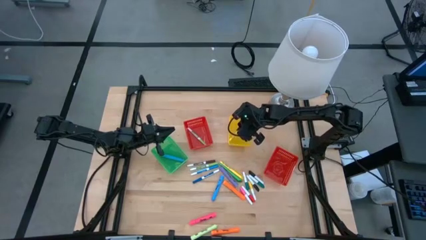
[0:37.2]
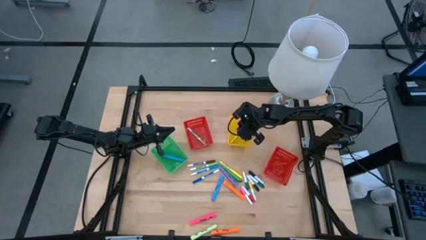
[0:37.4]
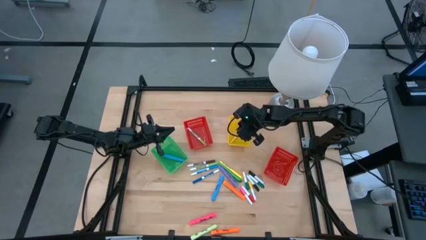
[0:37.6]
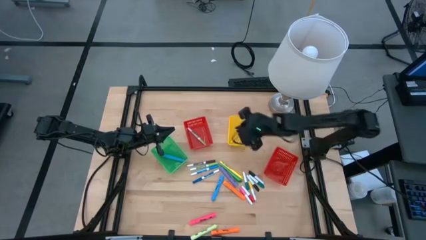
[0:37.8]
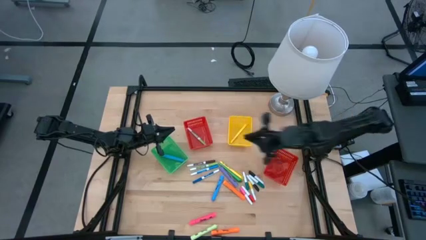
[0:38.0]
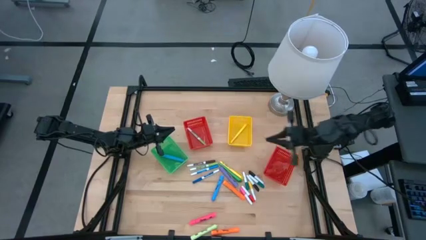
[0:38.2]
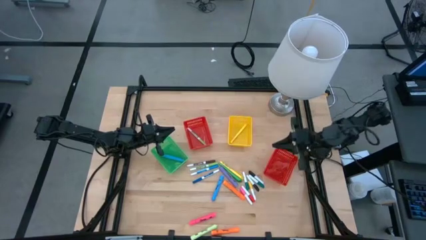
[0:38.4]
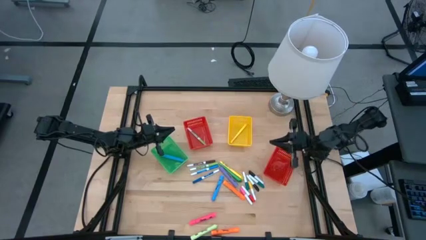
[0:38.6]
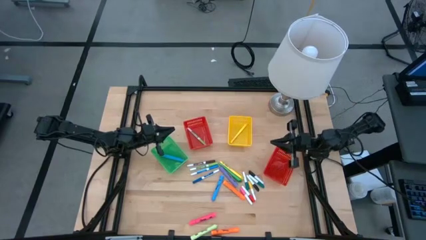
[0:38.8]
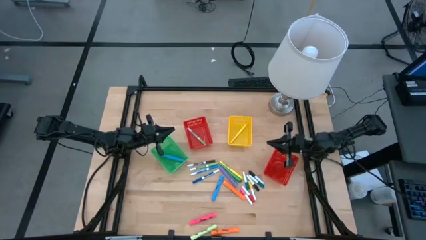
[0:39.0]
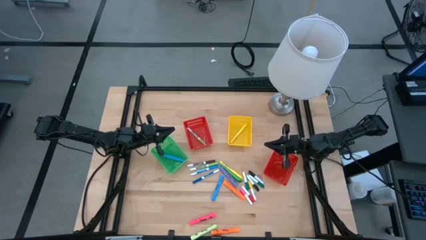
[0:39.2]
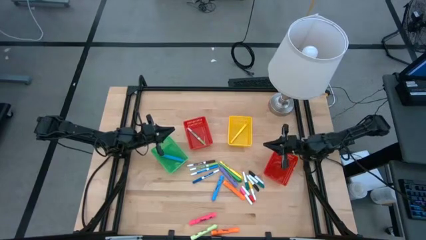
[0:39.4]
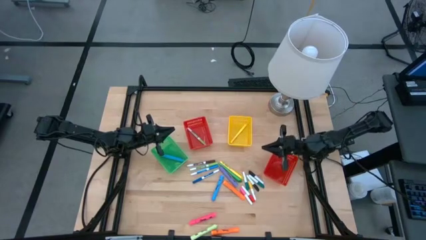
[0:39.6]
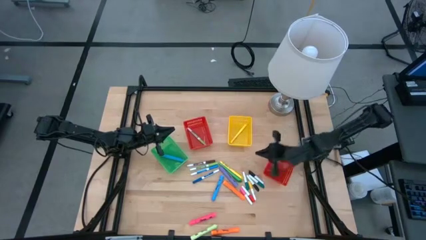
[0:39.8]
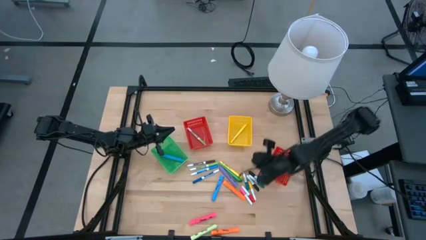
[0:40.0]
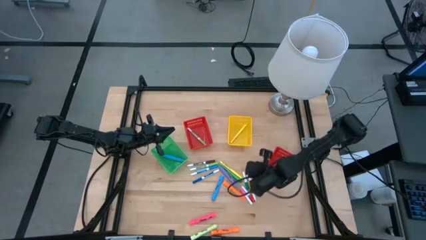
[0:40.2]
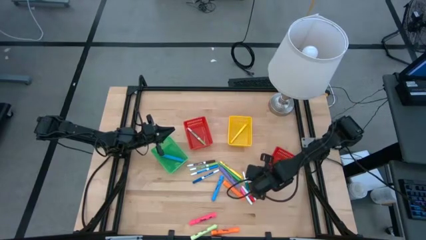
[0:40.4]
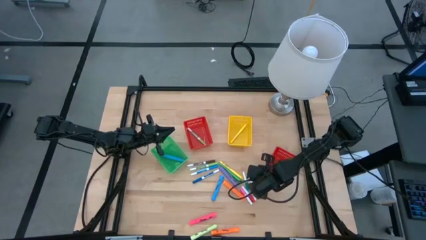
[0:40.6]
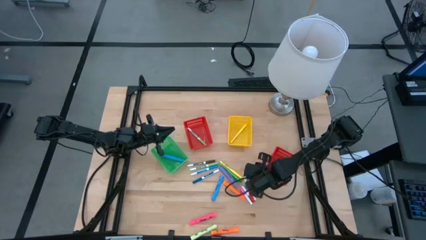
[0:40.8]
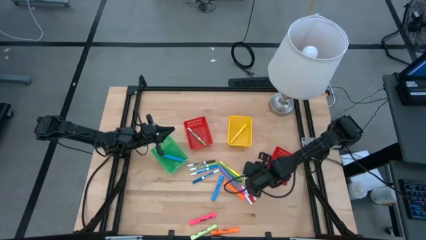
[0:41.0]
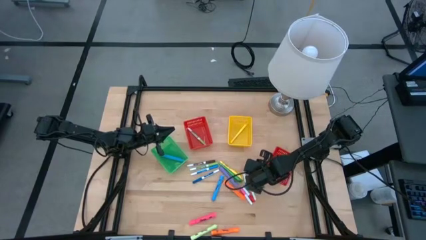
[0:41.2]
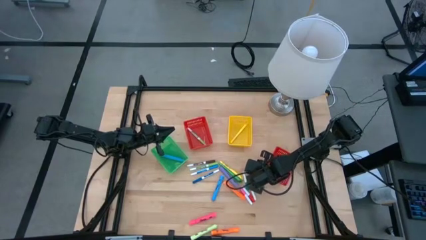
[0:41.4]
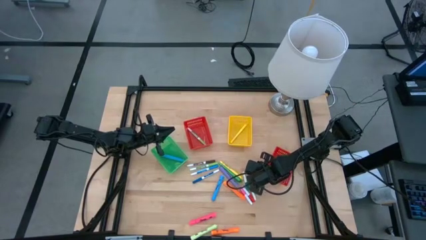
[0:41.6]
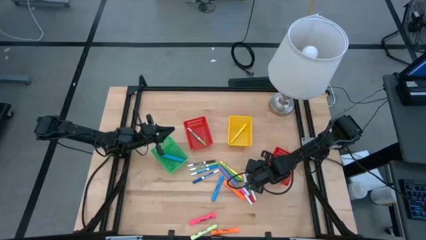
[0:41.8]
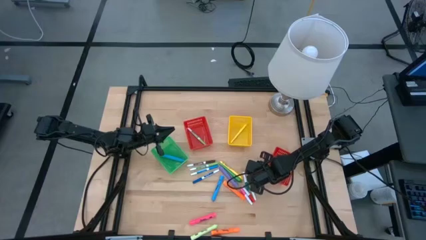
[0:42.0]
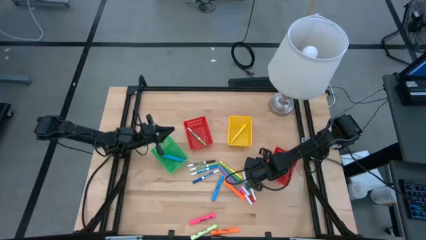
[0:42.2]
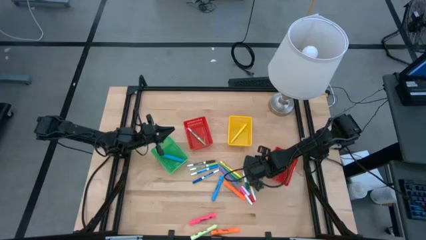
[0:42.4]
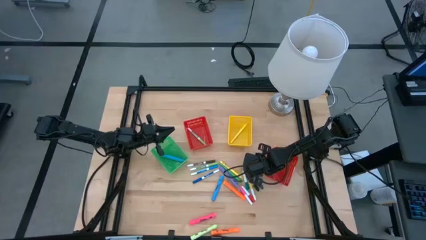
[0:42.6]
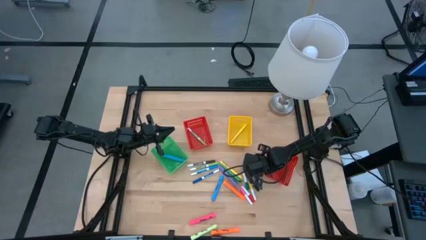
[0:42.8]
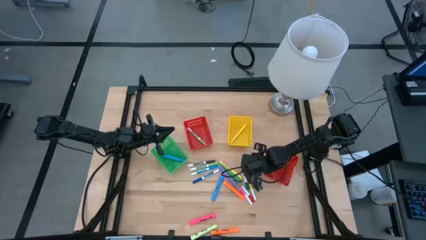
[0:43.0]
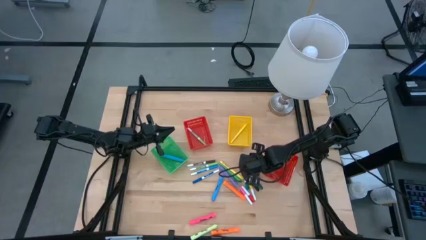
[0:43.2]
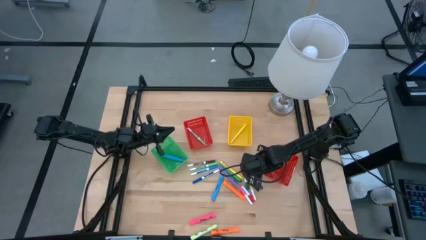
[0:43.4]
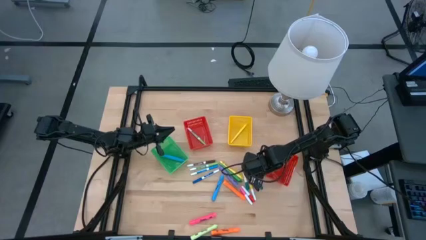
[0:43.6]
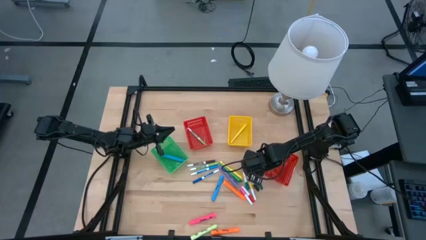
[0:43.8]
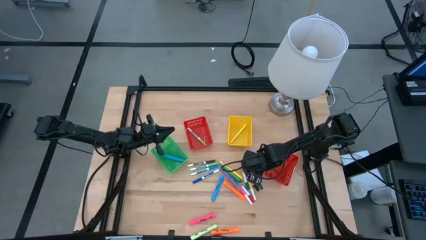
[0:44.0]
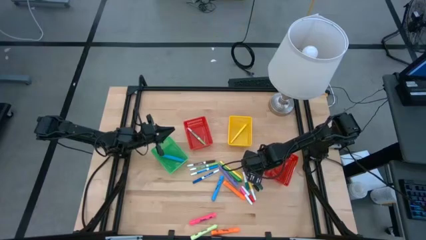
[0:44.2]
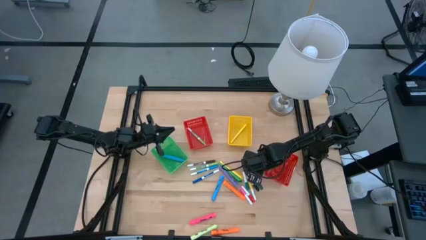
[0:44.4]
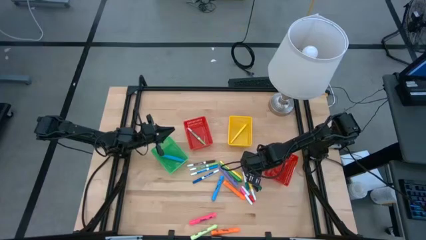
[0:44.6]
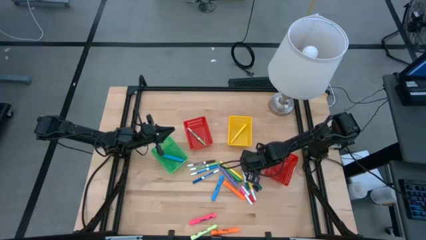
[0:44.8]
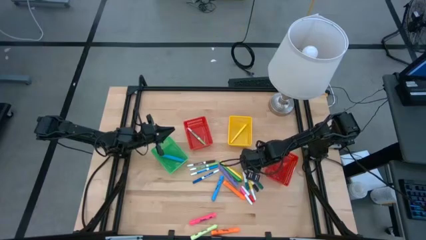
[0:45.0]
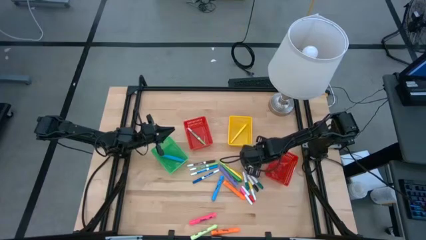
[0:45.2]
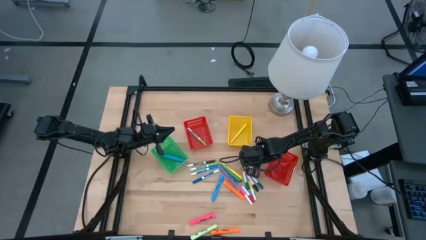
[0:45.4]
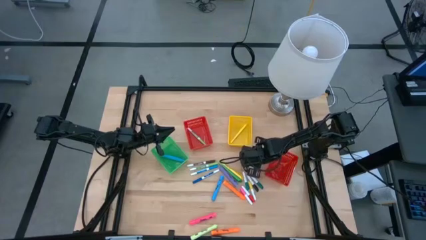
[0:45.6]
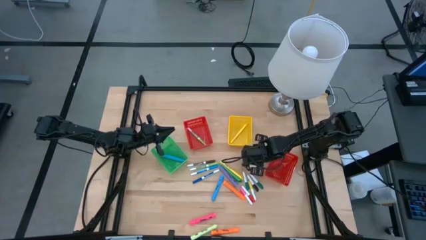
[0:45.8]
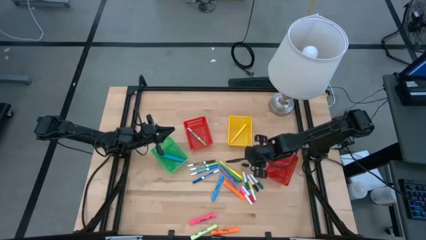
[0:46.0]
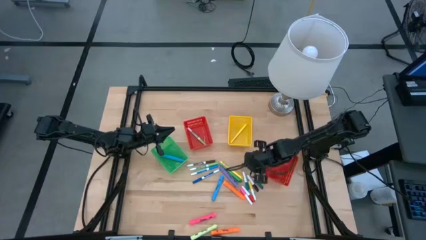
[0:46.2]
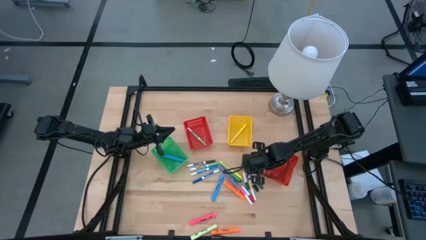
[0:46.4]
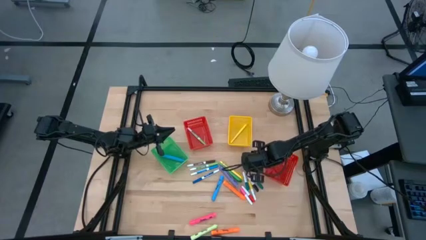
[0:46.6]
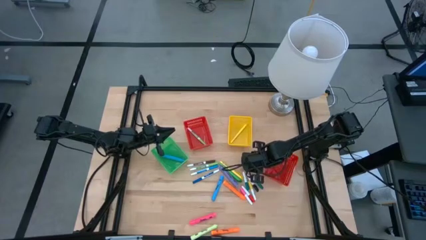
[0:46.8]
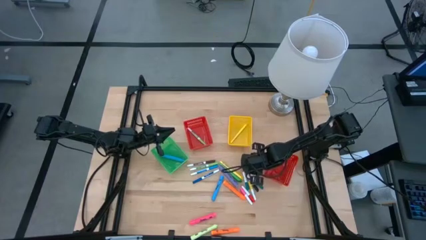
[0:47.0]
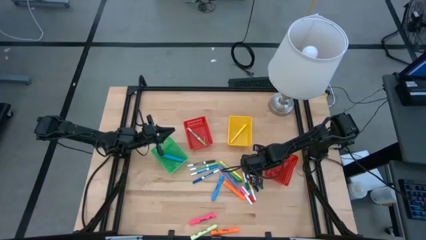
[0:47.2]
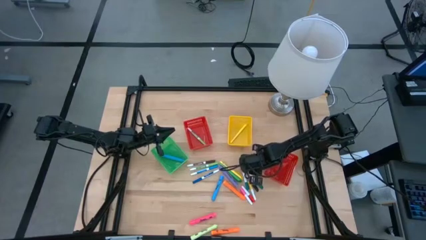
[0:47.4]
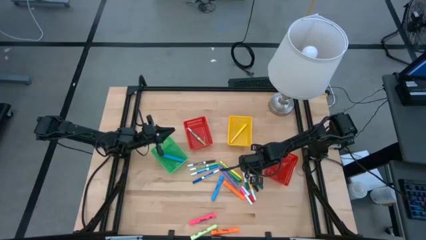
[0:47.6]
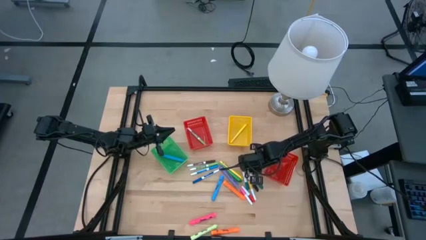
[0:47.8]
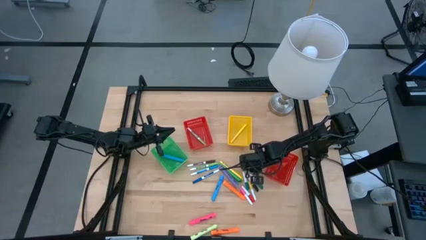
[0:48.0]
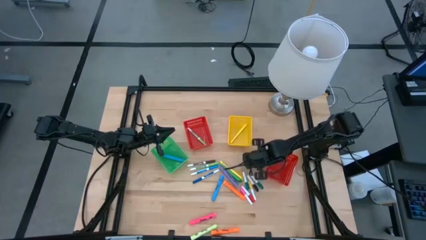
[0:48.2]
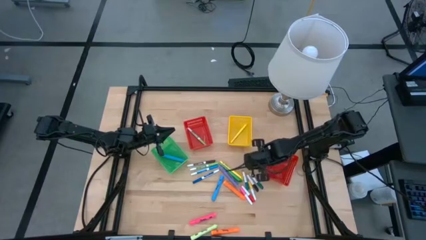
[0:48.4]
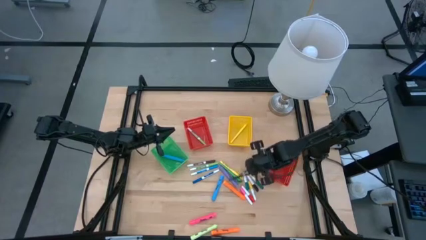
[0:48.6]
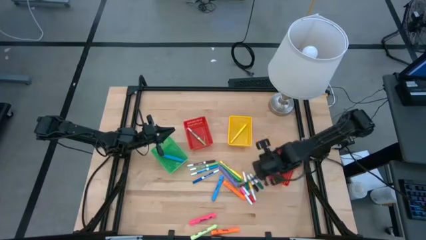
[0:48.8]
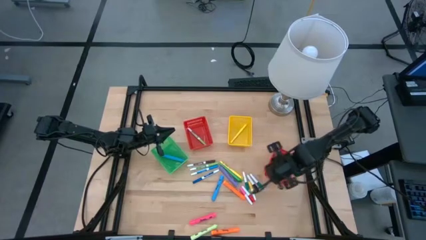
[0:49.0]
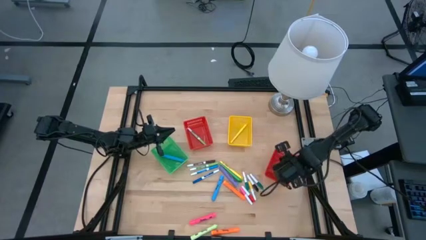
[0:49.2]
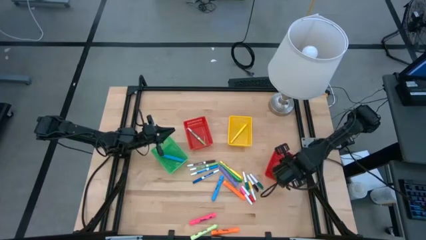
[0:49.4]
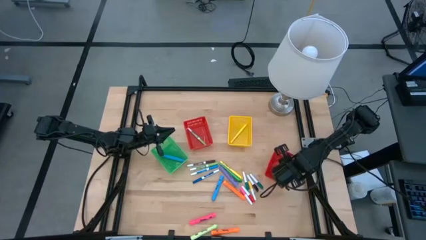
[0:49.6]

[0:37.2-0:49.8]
Task: Pick & Place Markers
Put the top small black highlighter pen into the red bin
